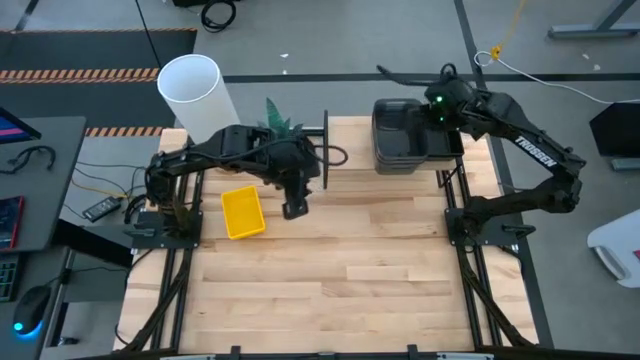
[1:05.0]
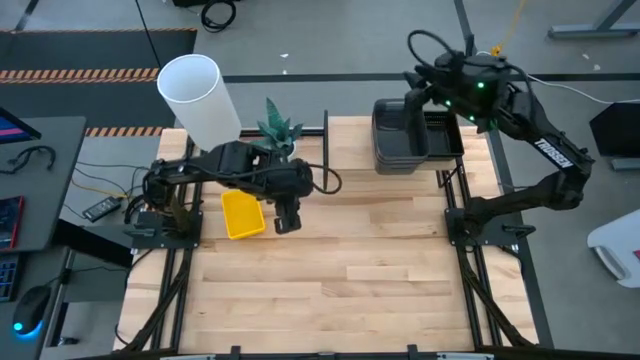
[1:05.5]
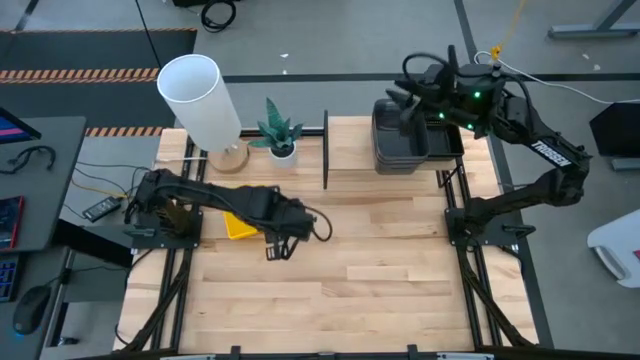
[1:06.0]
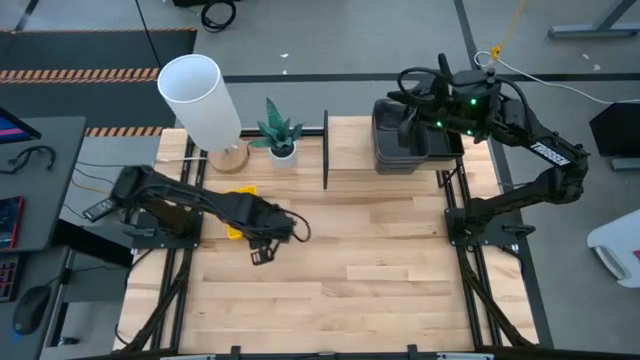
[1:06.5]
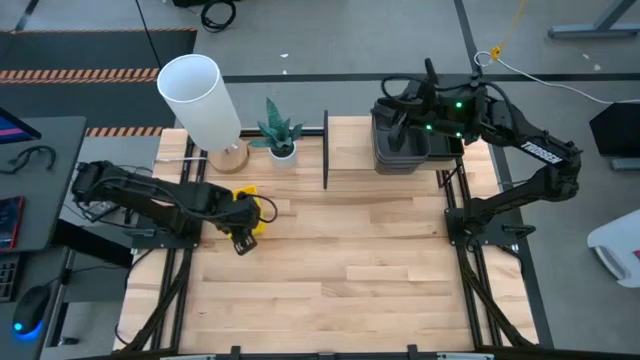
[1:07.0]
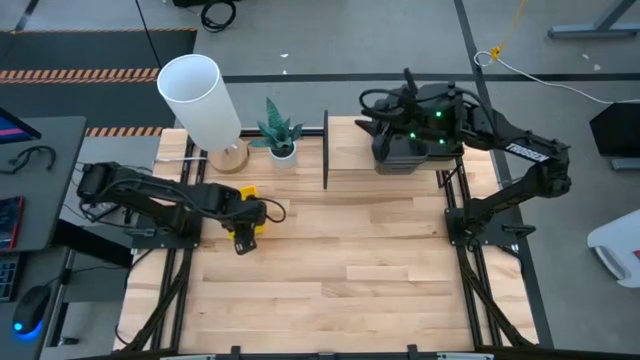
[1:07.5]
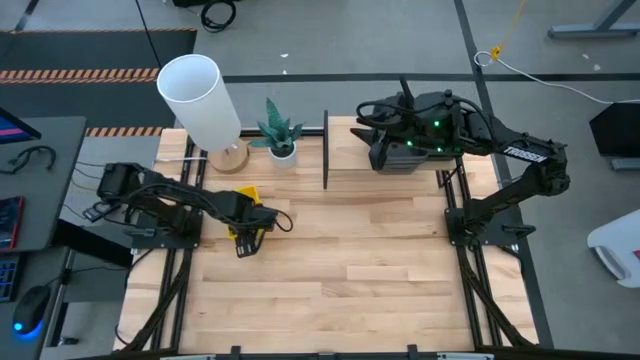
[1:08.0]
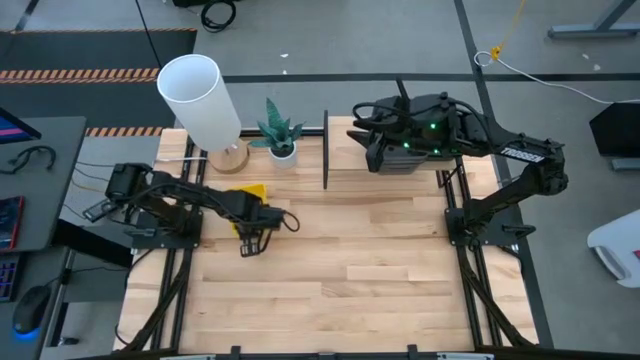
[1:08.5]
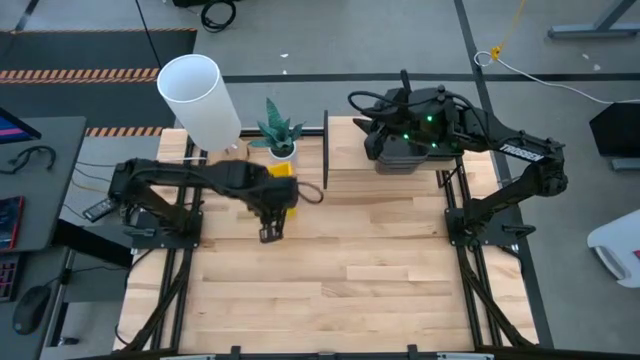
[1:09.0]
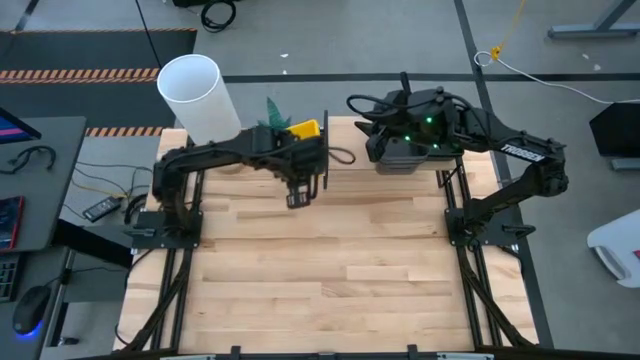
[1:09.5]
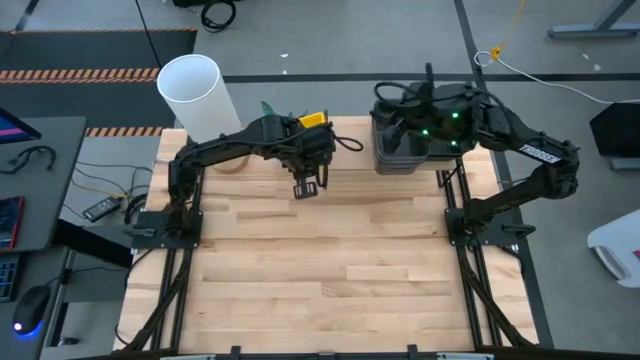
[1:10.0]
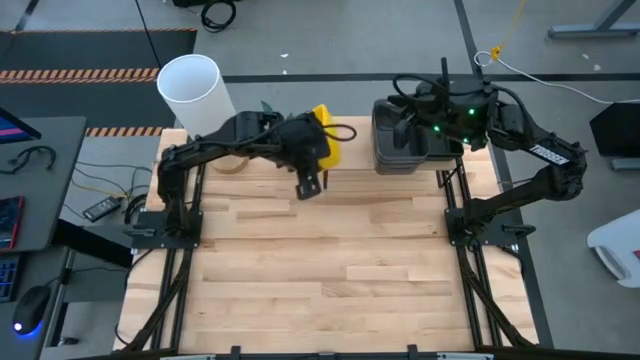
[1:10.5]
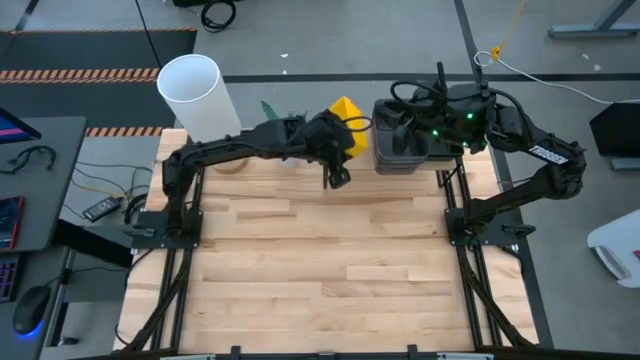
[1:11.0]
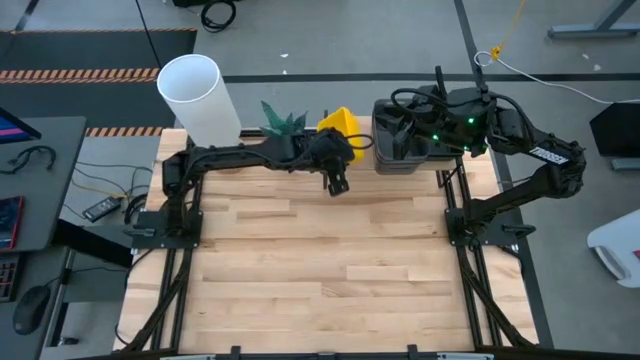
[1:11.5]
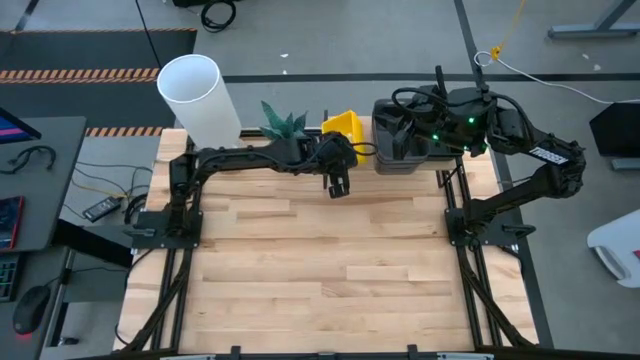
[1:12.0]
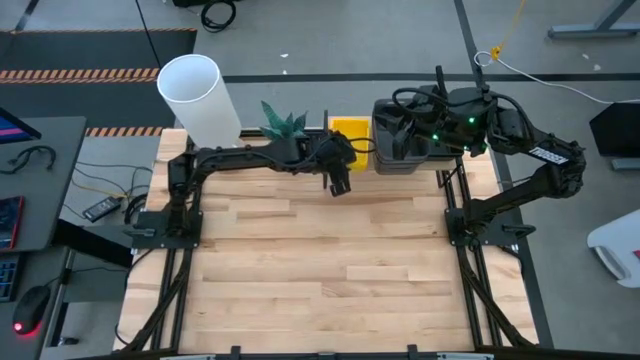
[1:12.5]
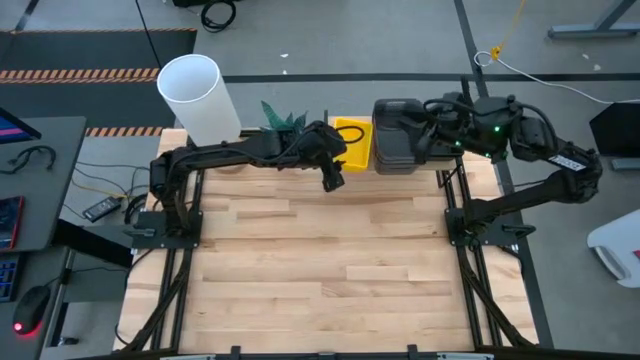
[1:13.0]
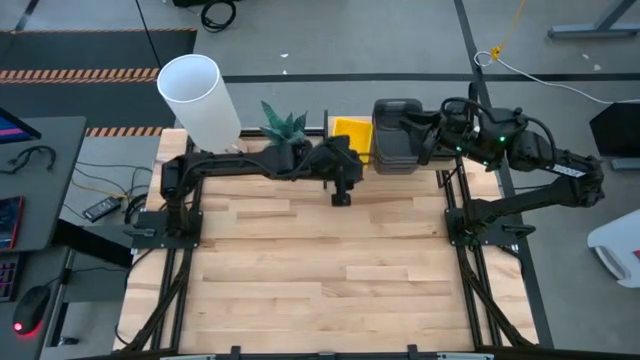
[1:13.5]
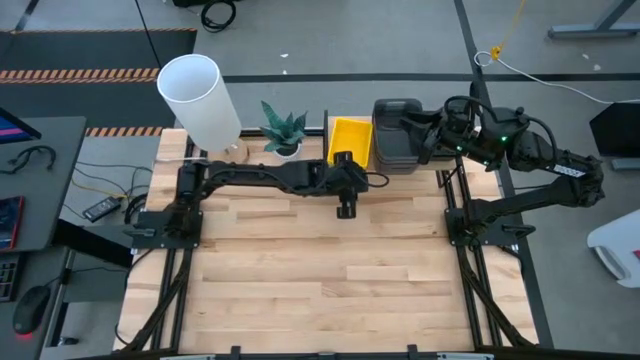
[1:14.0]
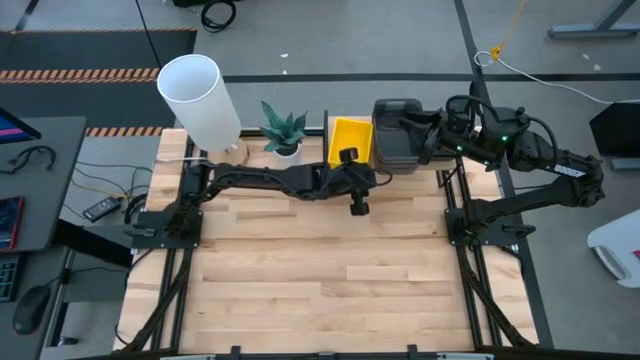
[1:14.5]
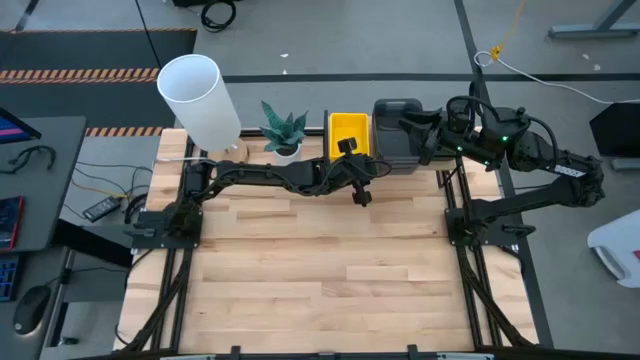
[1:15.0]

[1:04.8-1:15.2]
Task: Stack baskets on shelf by color
Put the stacked yellow bins on the shelf

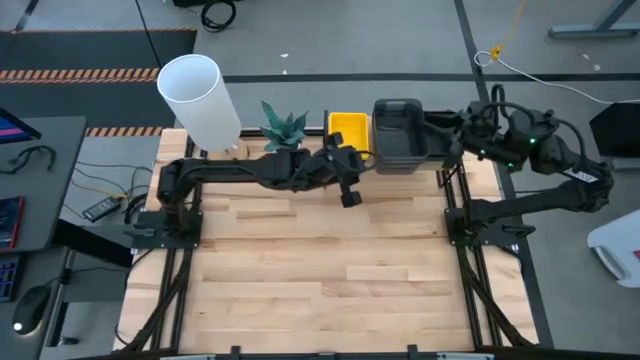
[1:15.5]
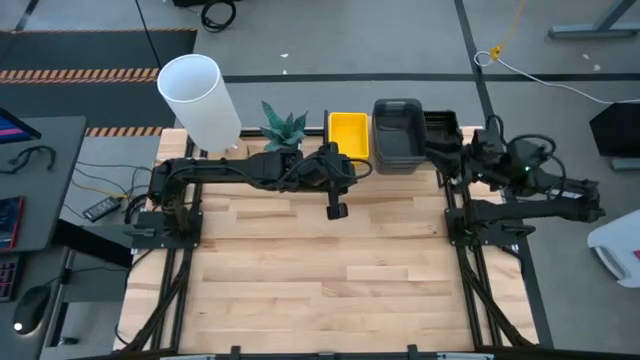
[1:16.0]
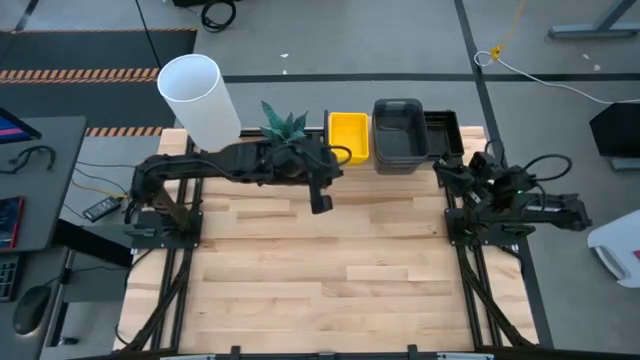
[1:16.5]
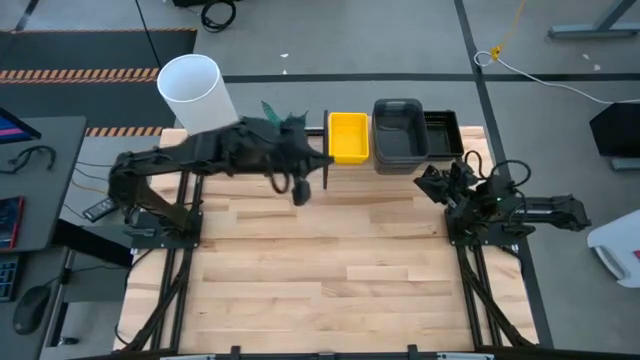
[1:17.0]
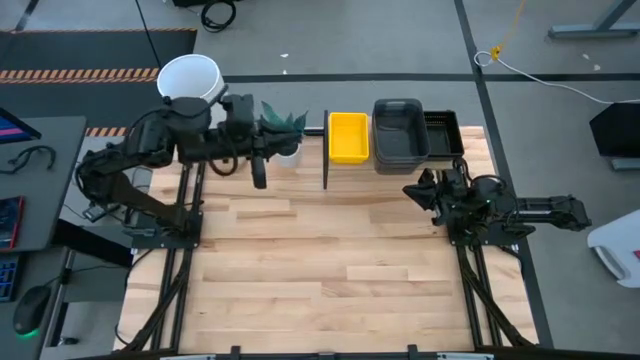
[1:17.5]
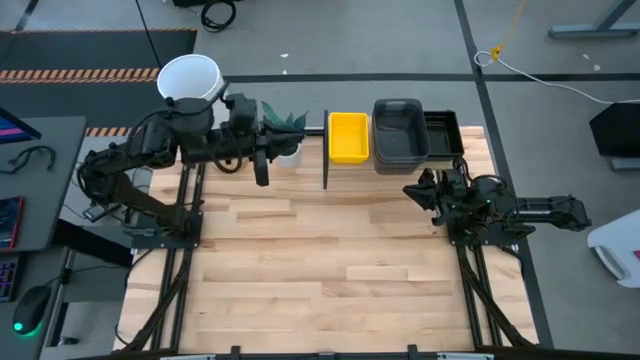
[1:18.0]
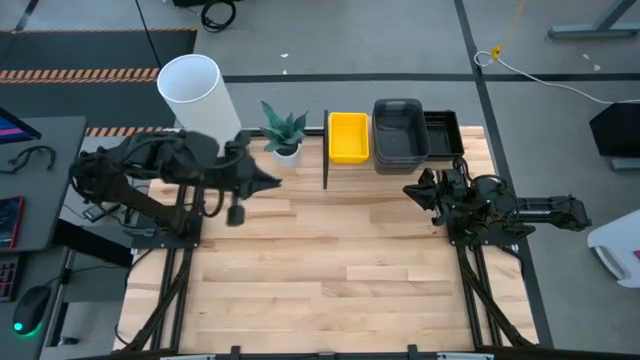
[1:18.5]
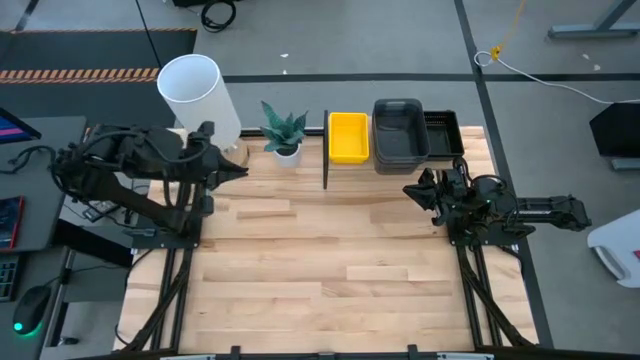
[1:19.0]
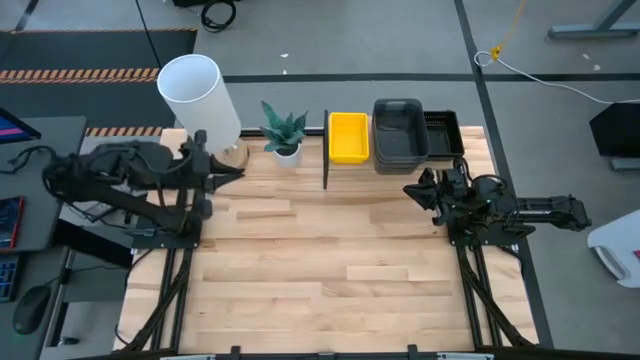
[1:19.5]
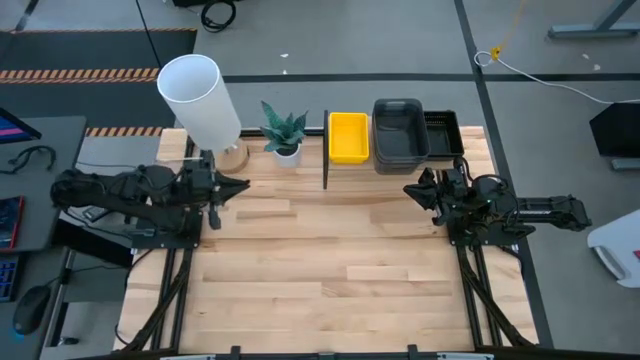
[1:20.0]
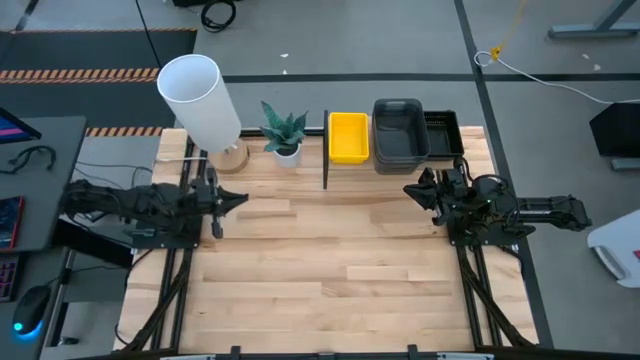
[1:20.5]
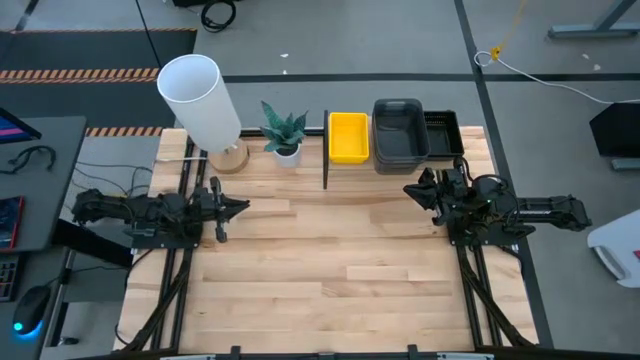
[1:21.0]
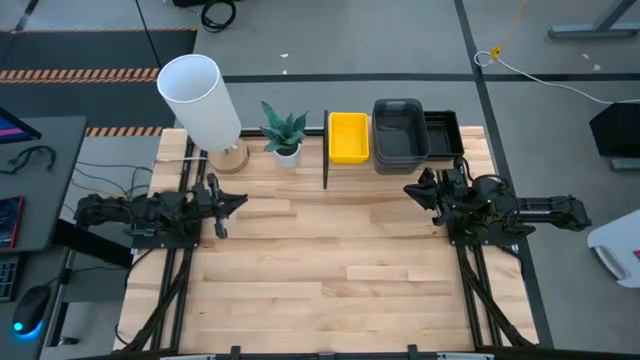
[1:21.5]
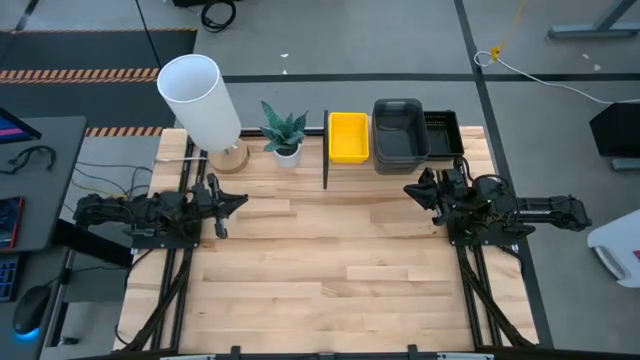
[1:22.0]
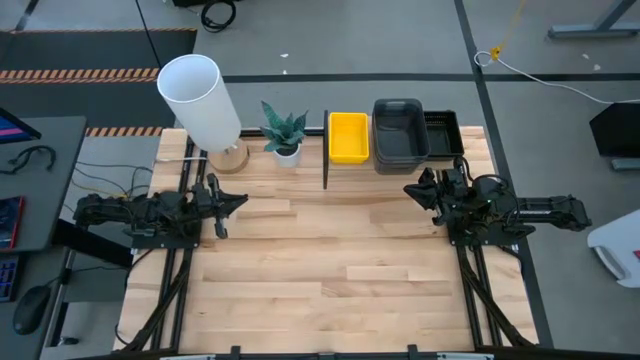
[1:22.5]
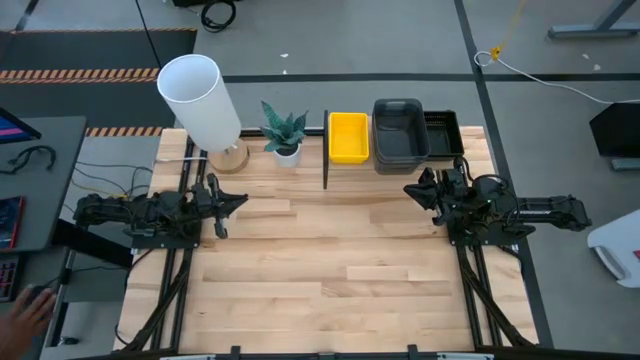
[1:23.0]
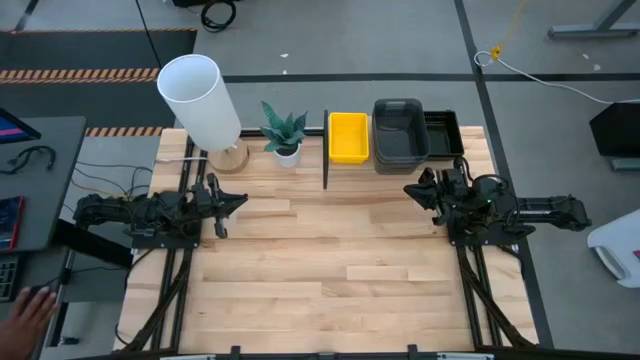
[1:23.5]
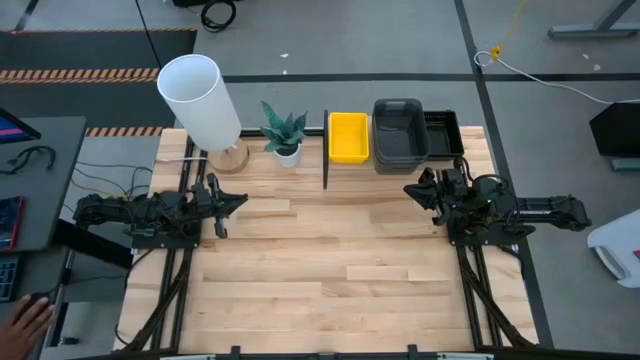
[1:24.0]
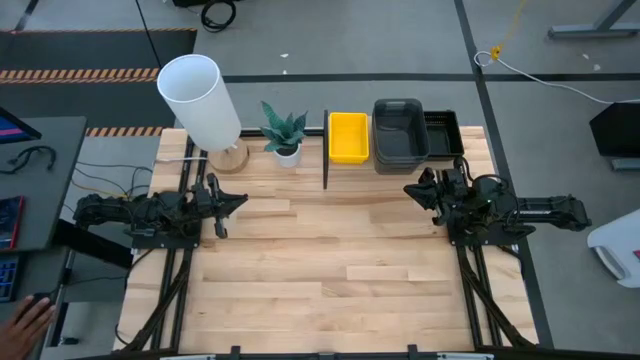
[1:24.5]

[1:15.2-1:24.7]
Return to Home Position
